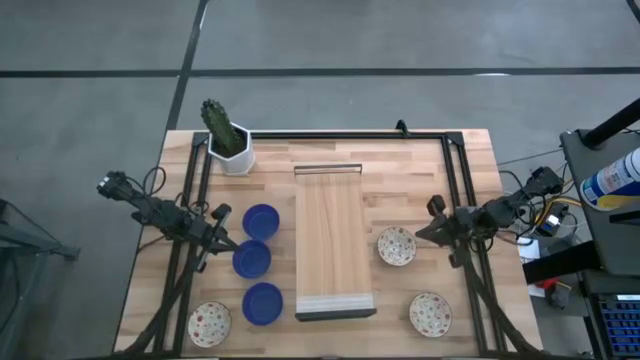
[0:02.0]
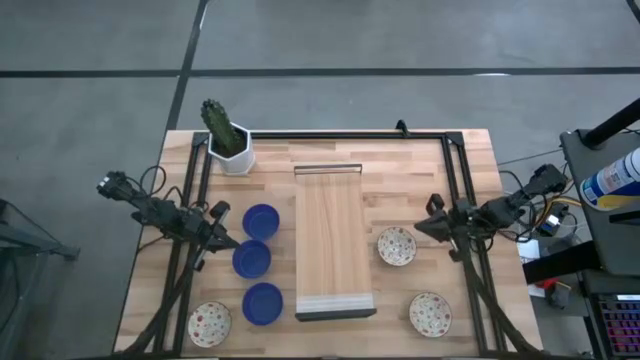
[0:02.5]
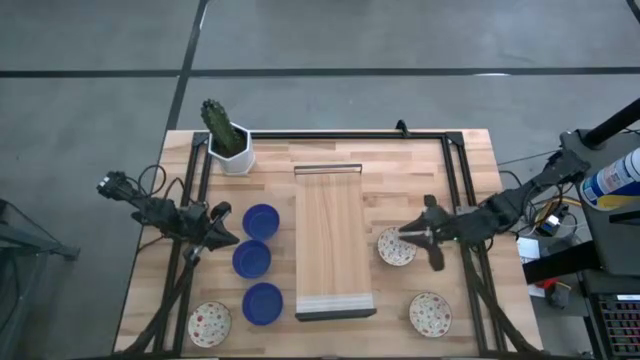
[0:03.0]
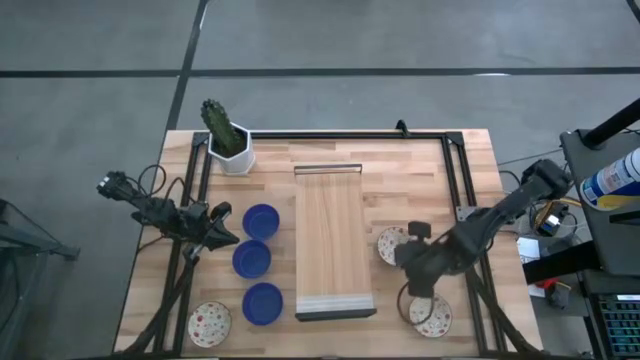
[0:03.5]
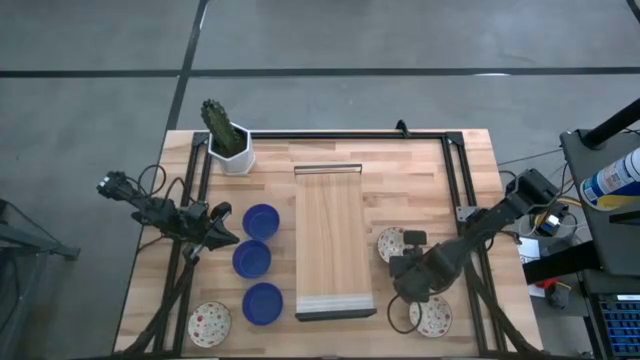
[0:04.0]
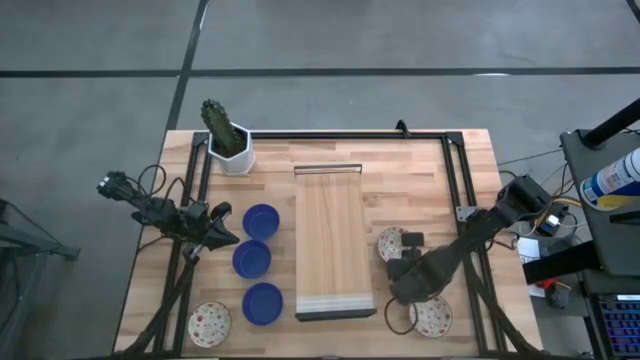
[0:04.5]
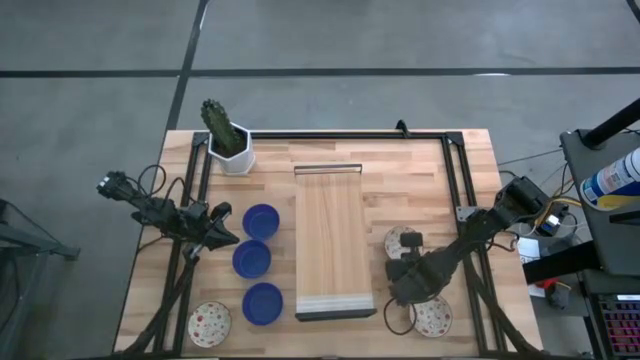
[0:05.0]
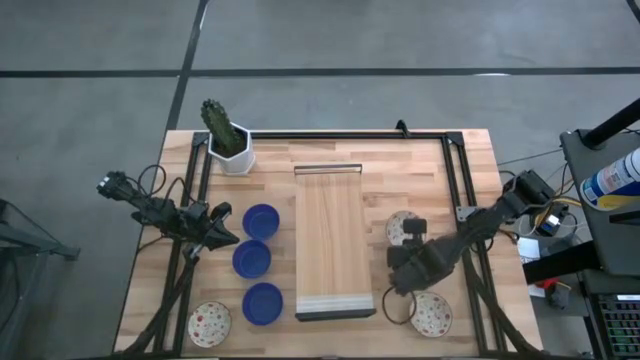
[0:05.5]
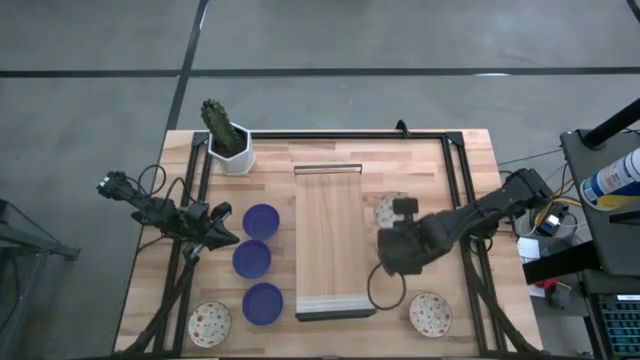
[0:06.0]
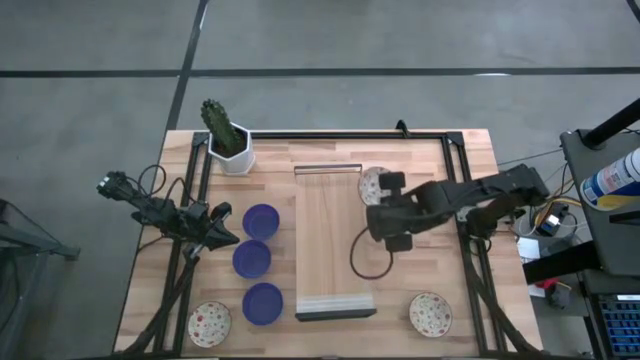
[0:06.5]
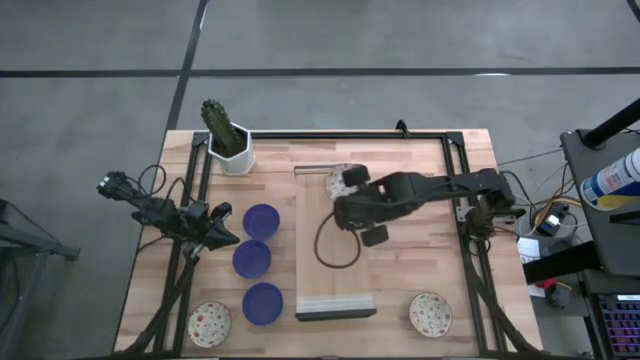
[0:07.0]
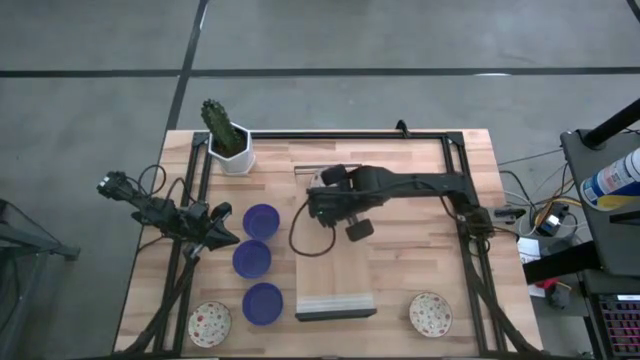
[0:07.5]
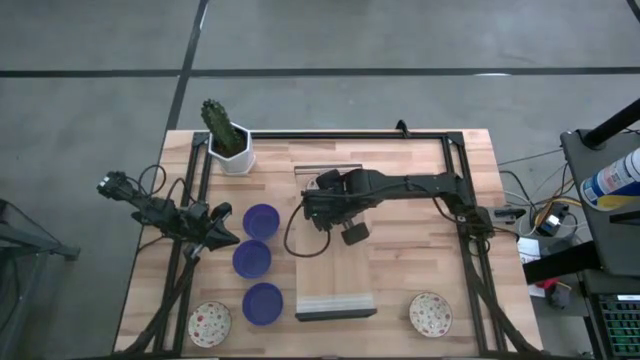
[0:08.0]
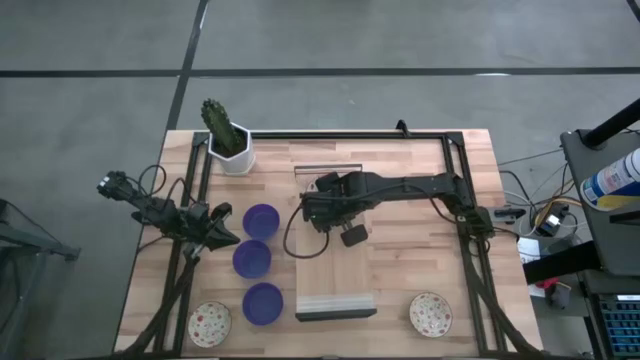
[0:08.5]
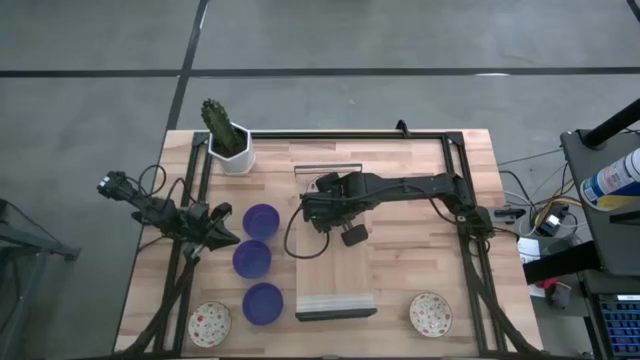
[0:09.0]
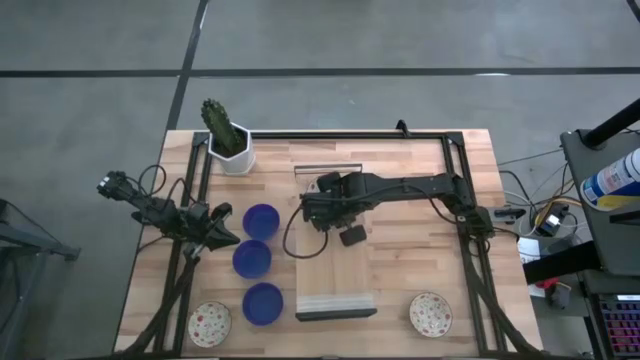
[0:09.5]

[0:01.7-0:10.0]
Task: Pick & Place Mini bowls
Put the top white patterned bowl on the shelf

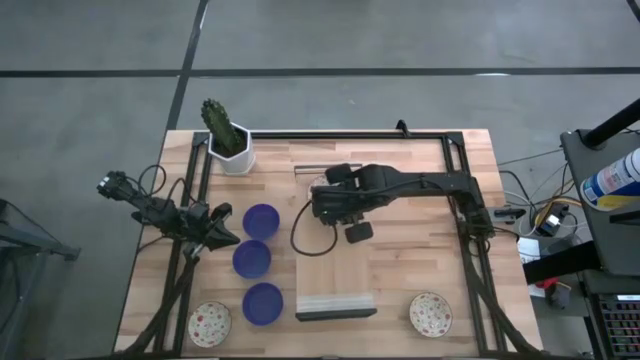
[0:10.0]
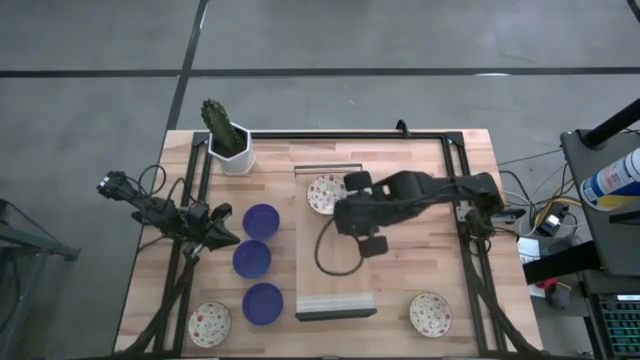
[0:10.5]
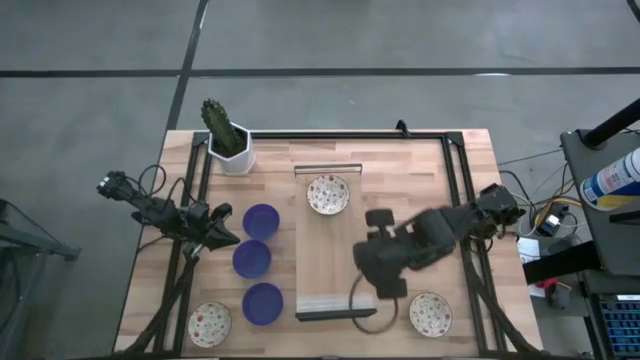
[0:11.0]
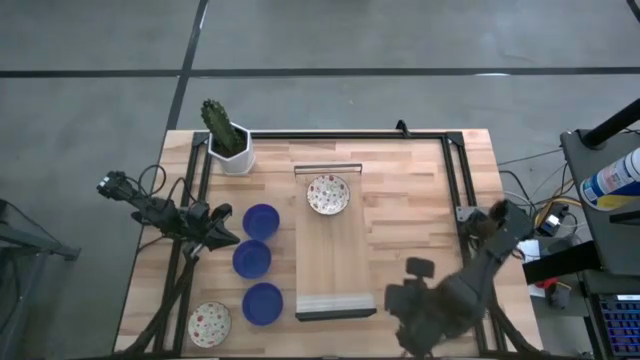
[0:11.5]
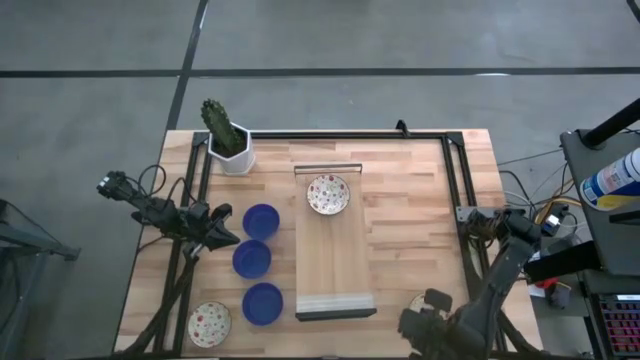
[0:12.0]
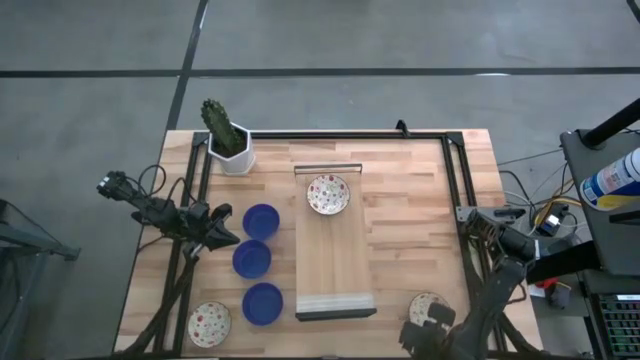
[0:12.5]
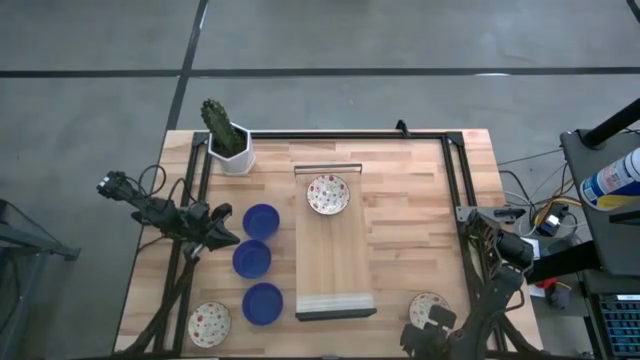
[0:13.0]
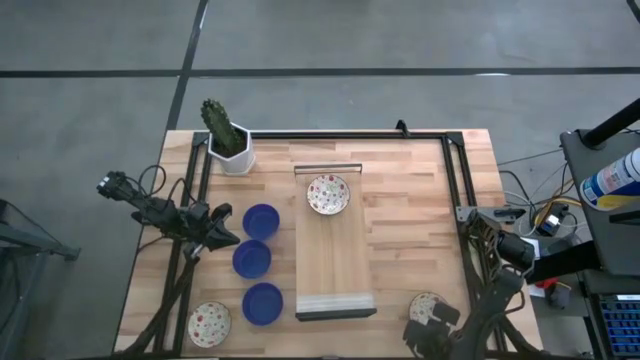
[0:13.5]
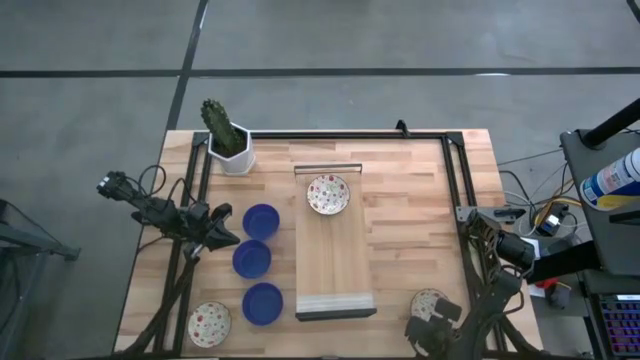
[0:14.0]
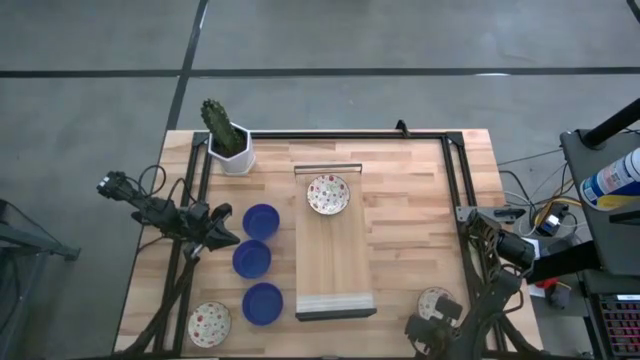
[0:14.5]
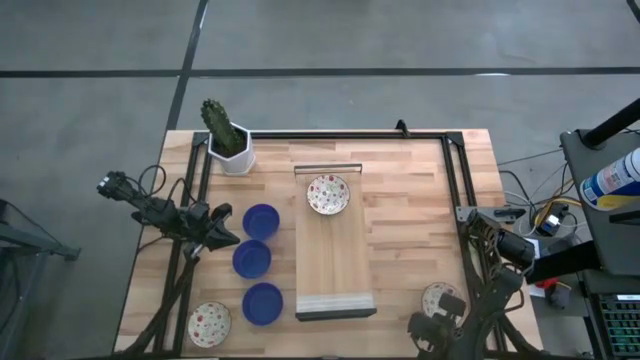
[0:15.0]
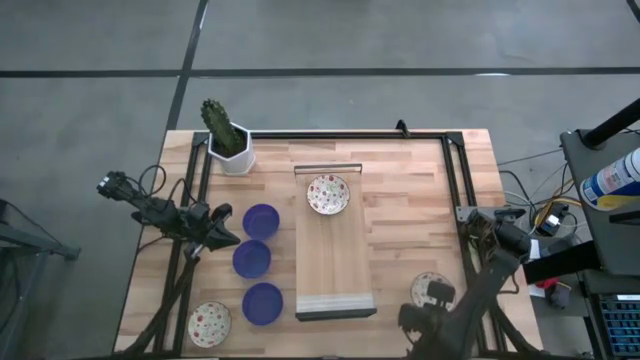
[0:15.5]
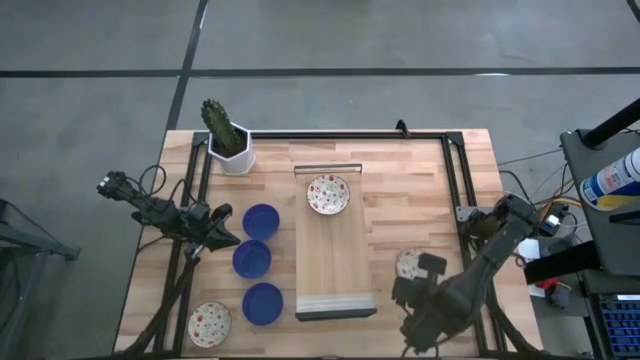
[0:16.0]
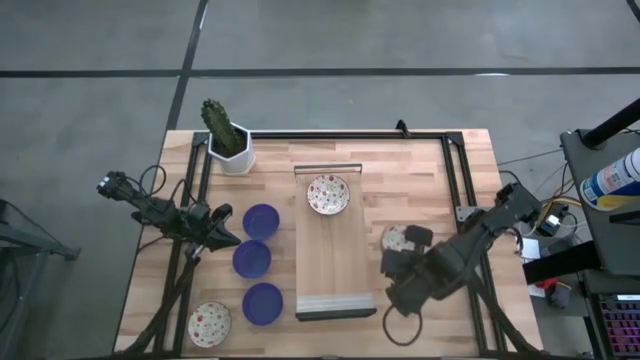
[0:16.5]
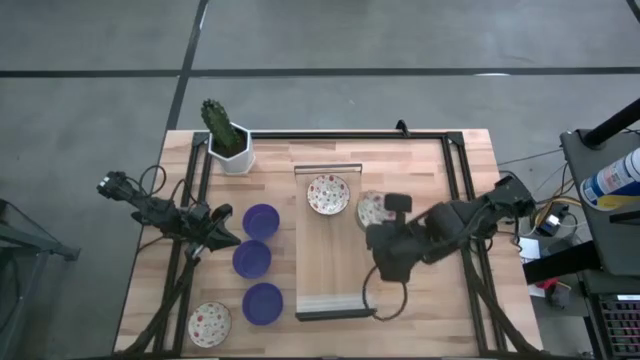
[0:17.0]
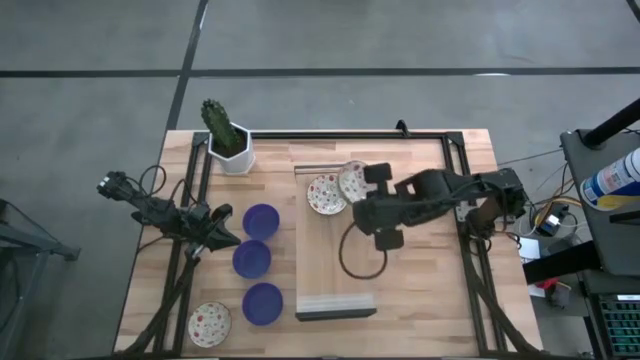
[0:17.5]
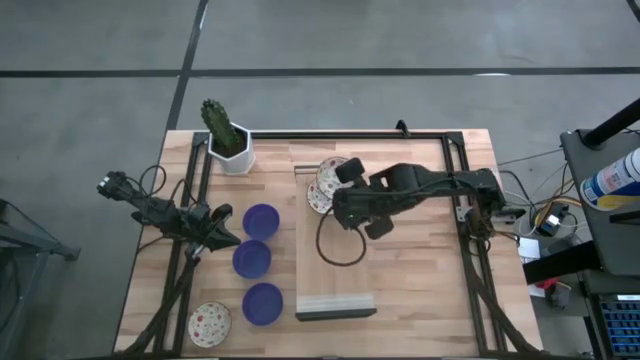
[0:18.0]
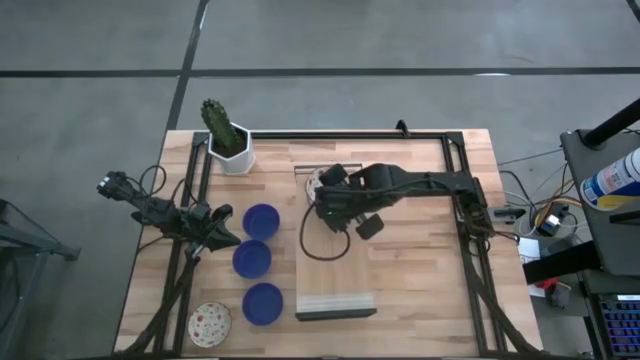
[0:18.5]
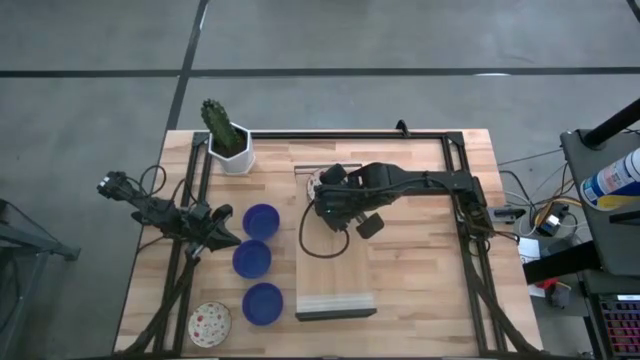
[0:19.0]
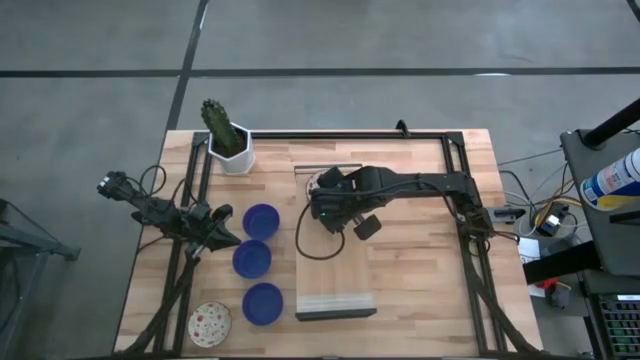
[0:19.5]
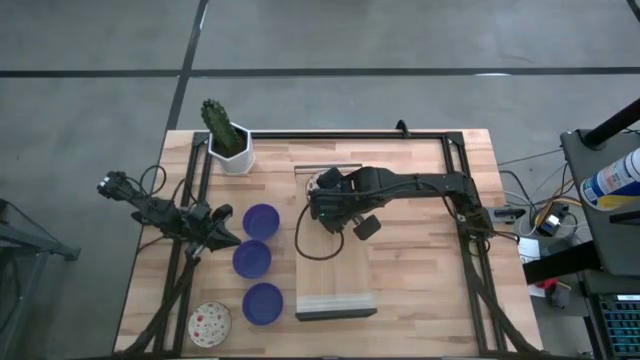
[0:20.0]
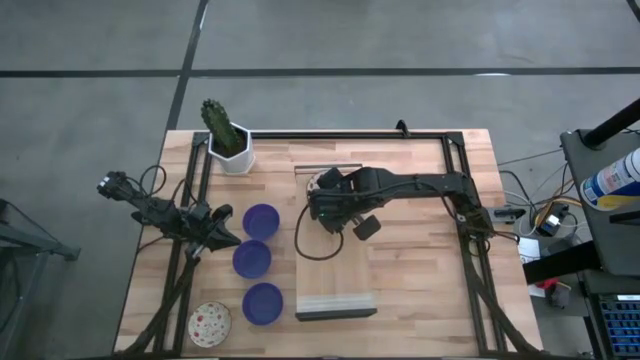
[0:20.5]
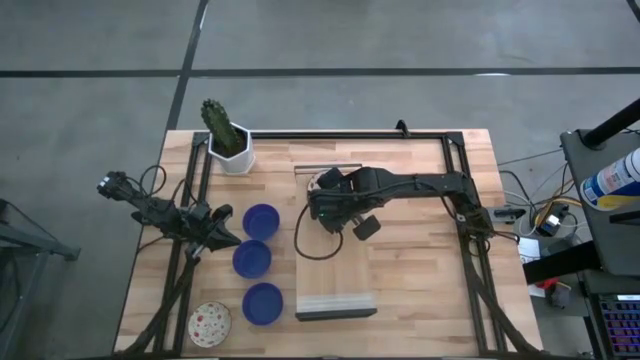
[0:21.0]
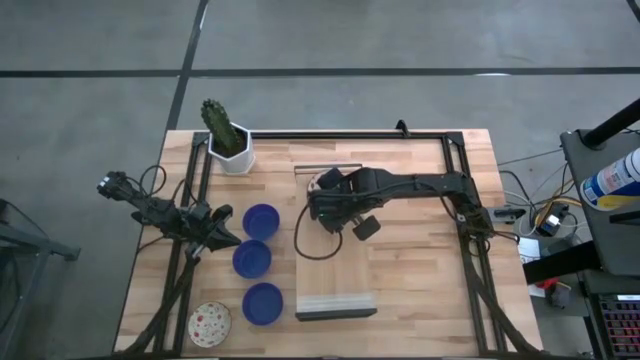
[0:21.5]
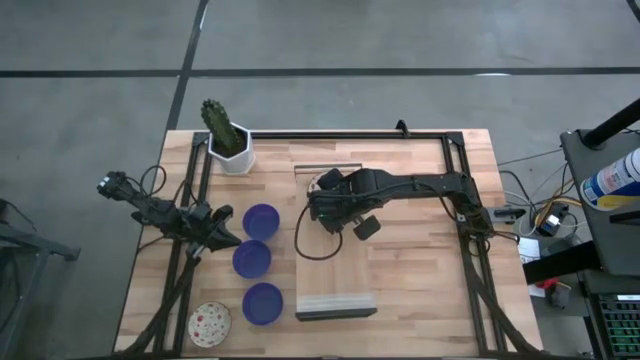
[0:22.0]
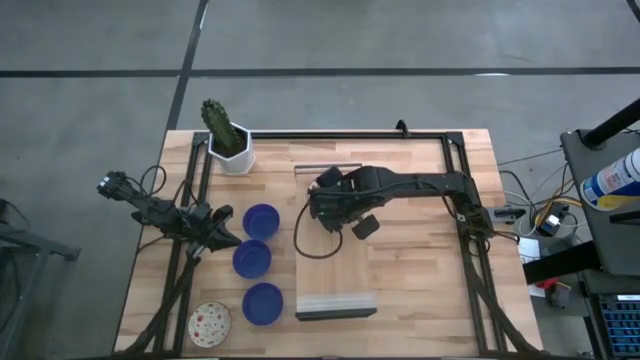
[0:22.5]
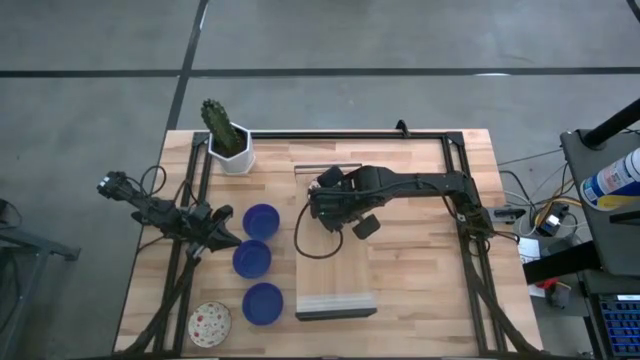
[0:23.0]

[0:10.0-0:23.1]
Stack the right white patterned bowl on top of the white patterned bowl on the shelf
